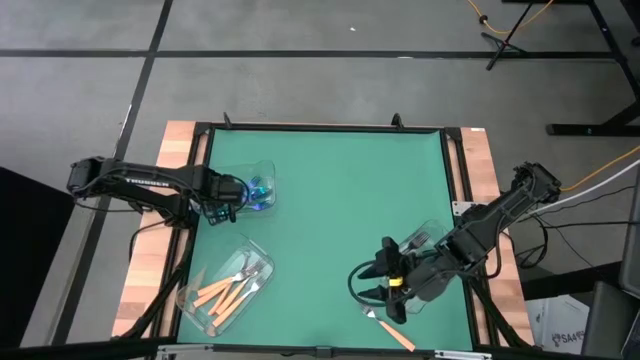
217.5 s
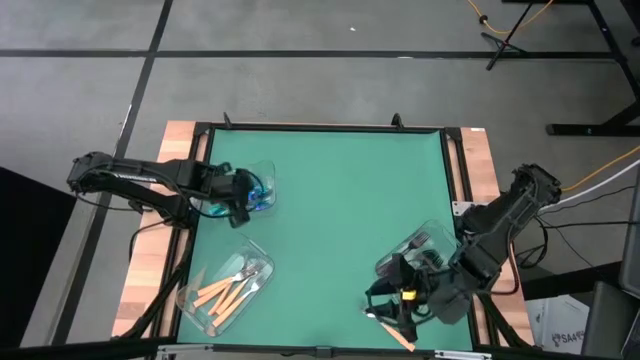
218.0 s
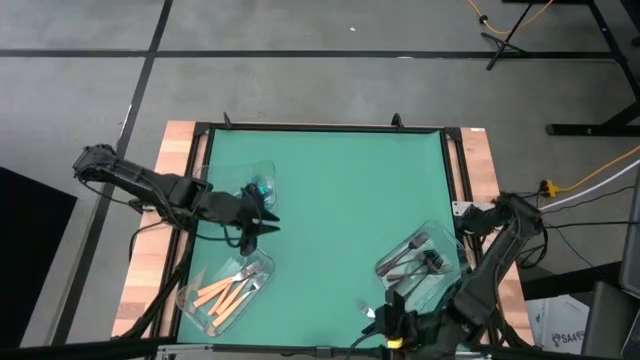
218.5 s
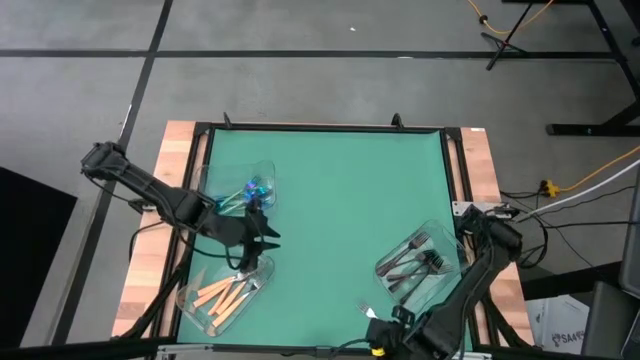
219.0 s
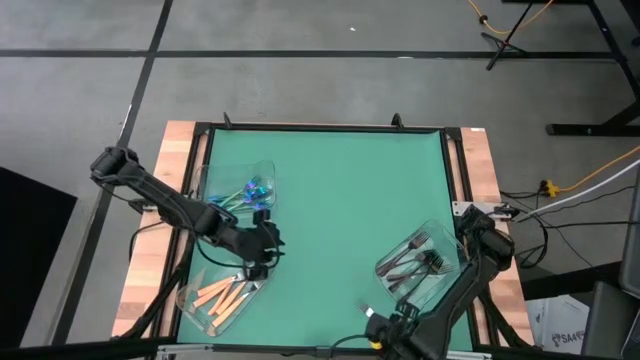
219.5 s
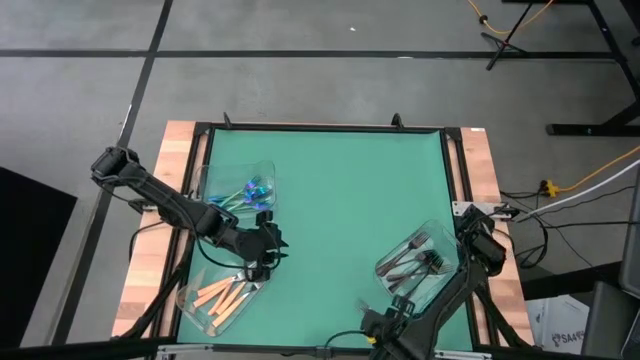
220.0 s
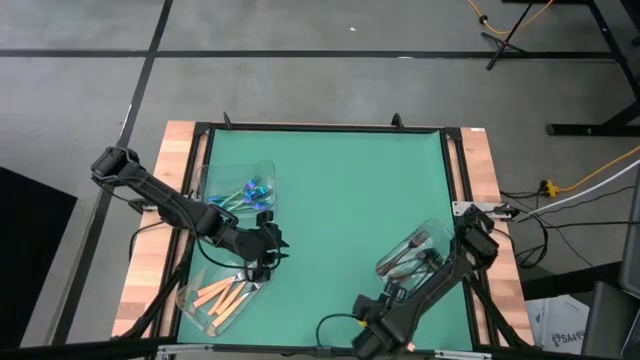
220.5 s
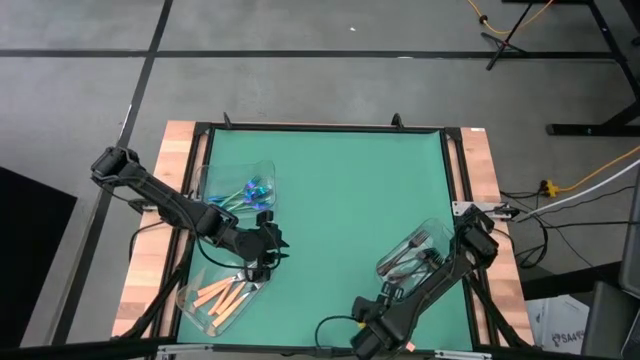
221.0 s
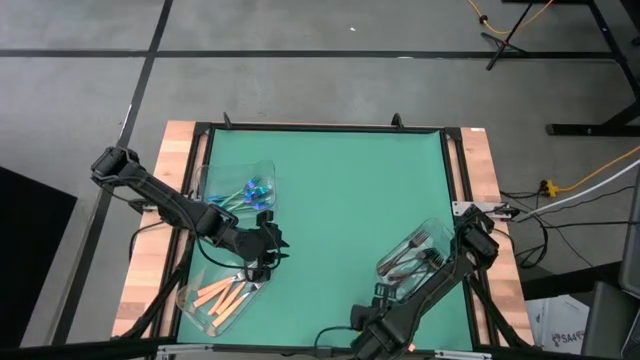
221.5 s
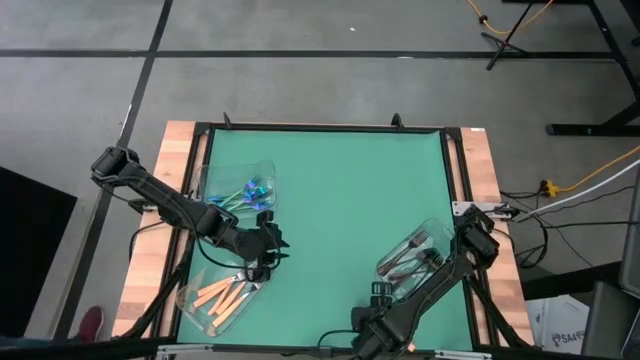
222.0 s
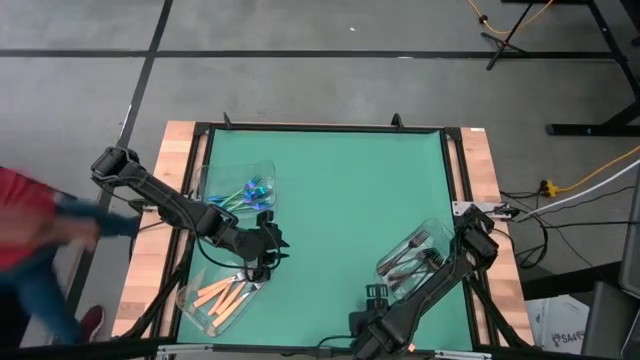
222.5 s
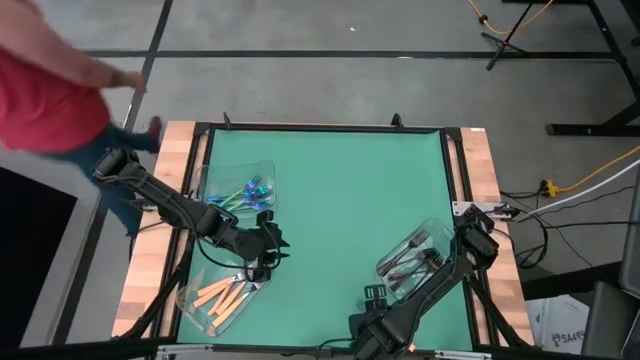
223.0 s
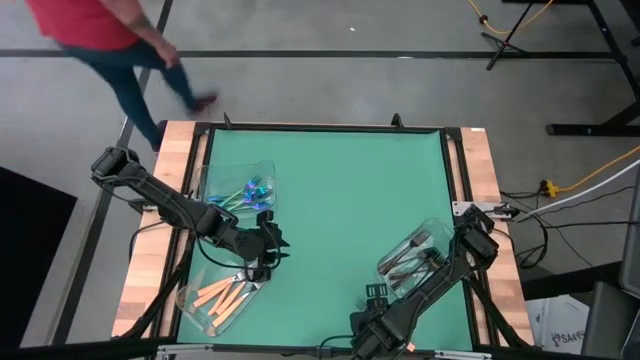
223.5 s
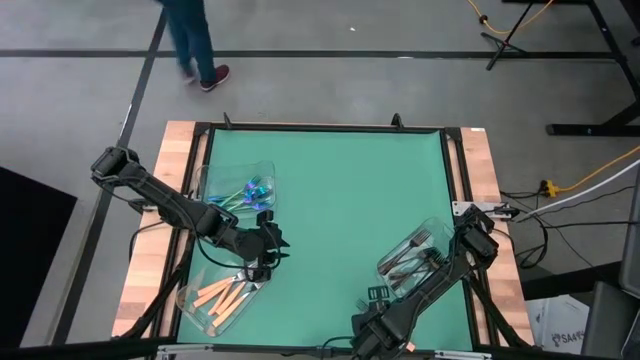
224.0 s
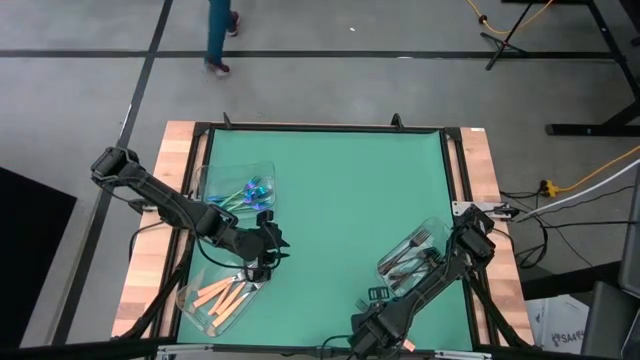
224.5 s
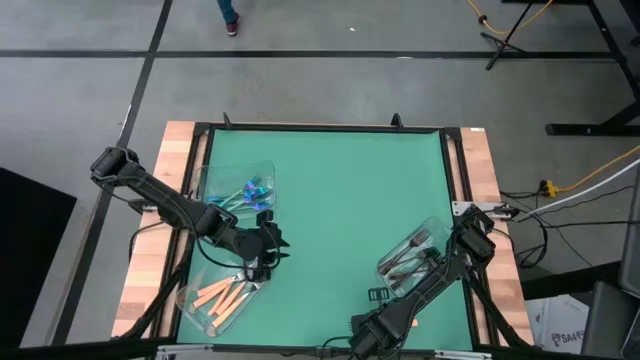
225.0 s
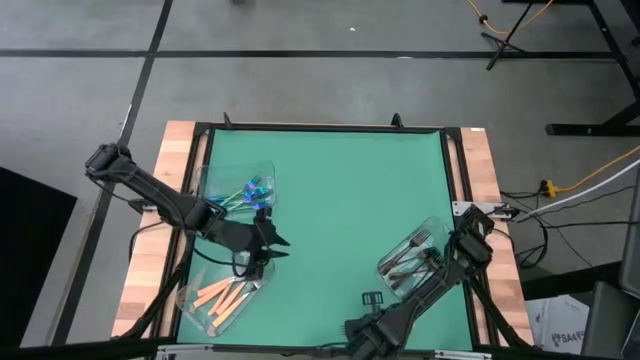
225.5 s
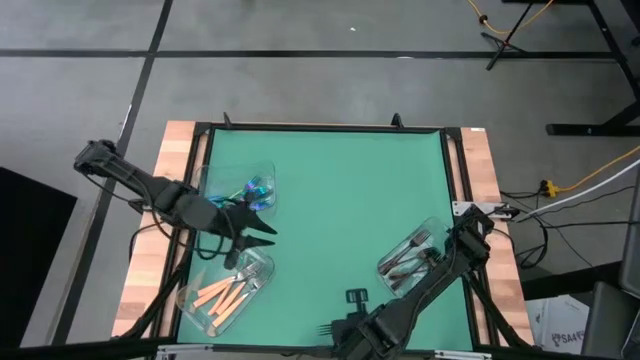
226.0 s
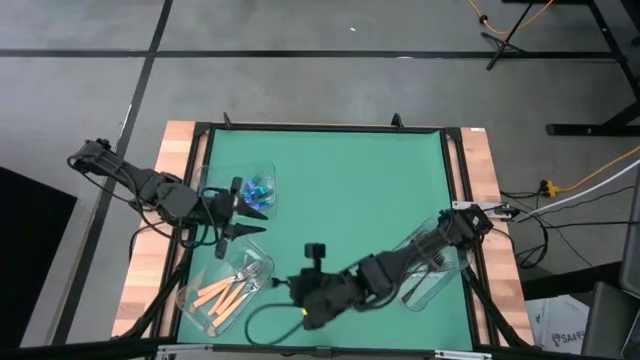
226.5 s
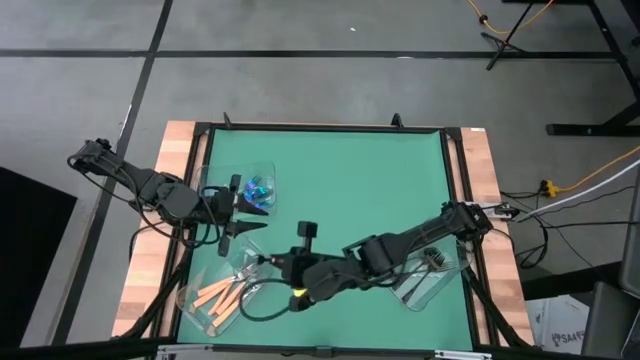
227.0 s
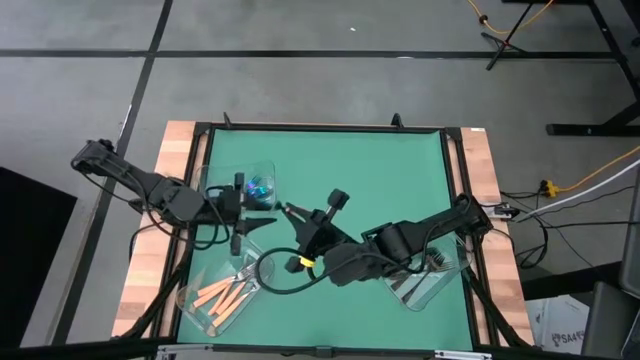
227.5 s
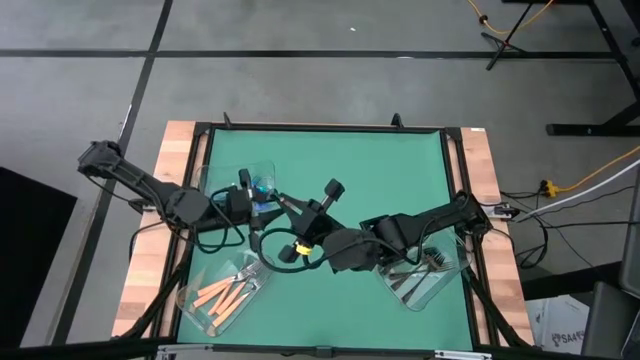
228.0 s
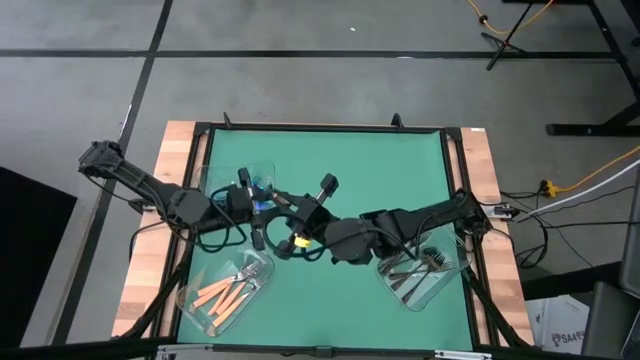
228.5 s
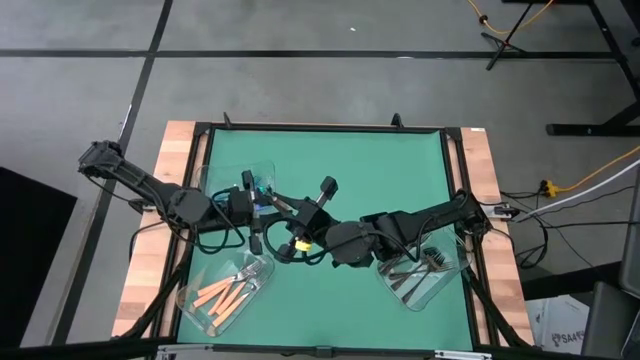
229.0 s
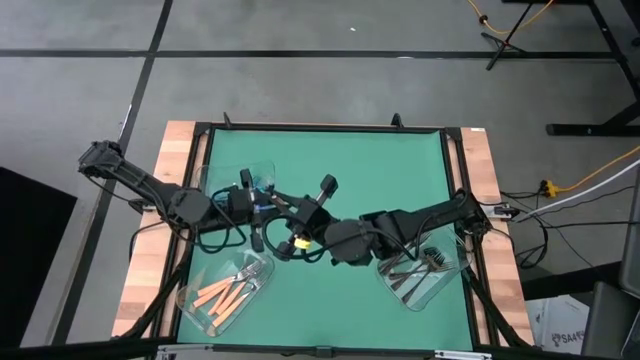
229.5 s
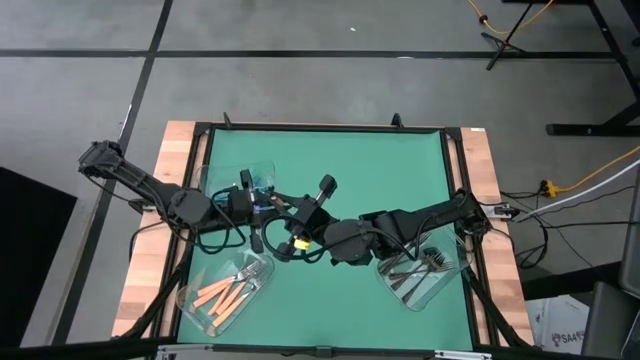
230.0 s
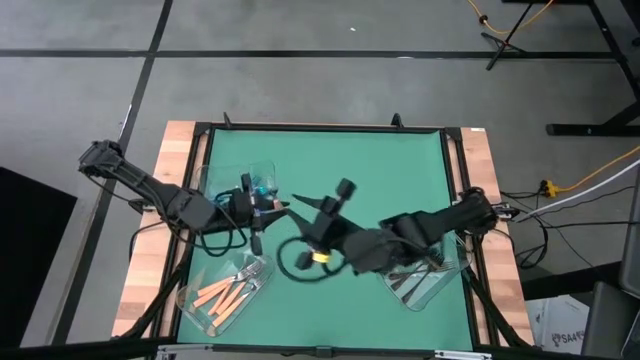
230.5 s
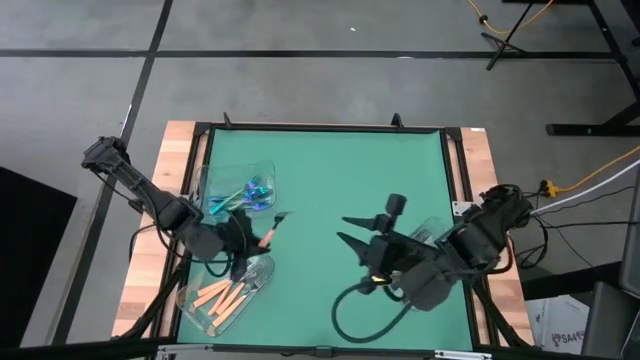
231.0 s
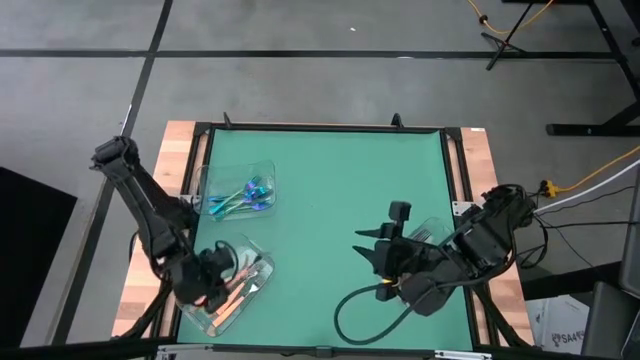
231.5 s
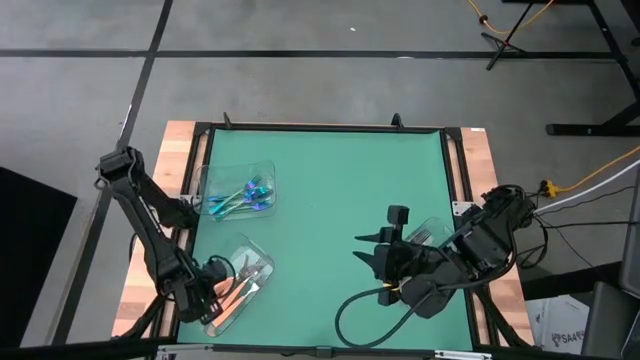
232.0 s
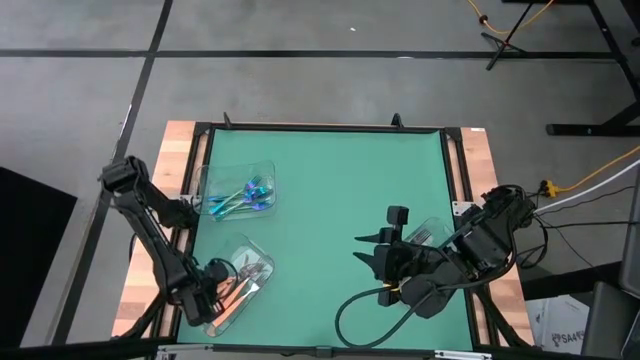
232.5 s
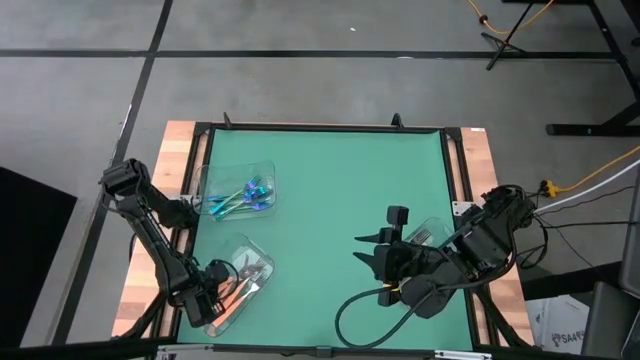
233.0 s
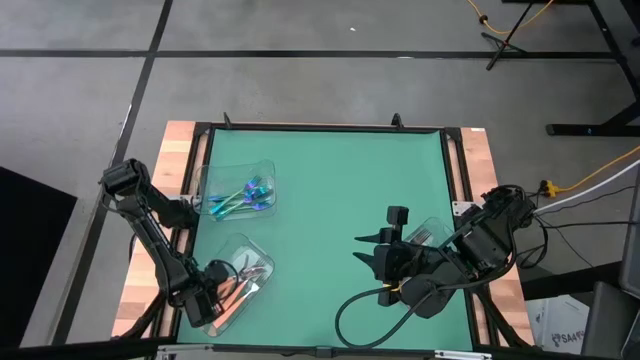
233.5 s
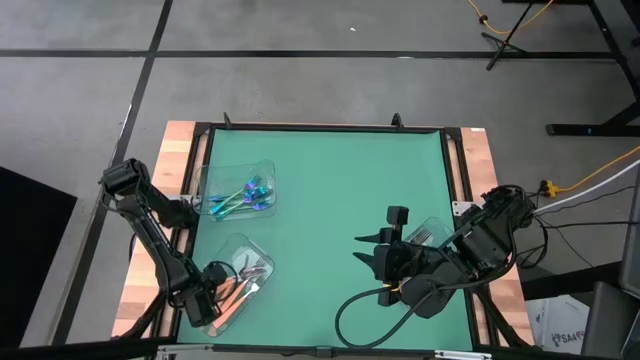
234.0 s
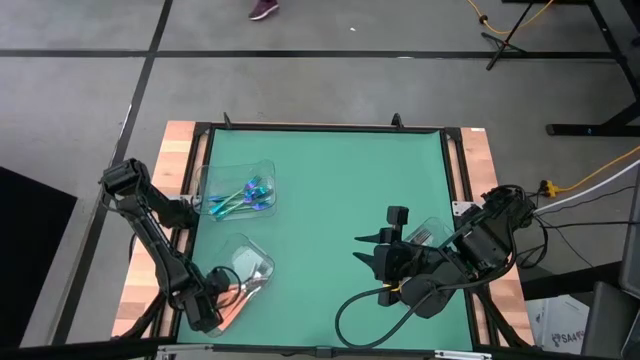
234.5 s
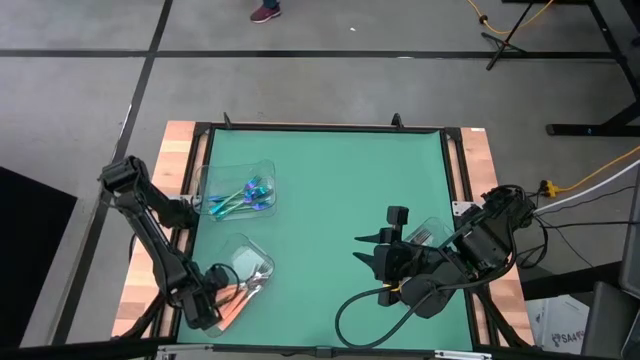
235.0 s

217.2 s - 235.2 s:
Task: Sort silverware by color (type)
Put the yellow fork into the bottom left transparent bin
